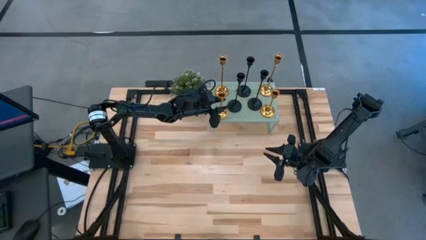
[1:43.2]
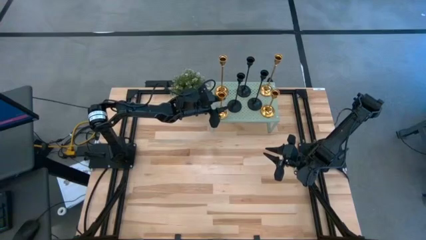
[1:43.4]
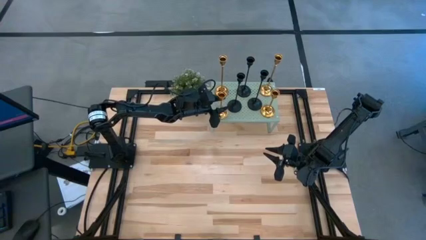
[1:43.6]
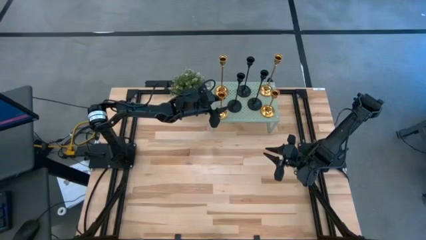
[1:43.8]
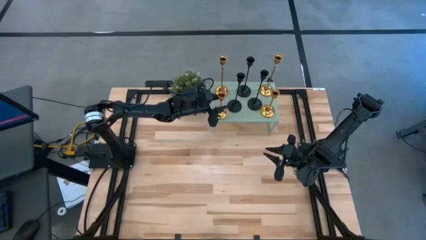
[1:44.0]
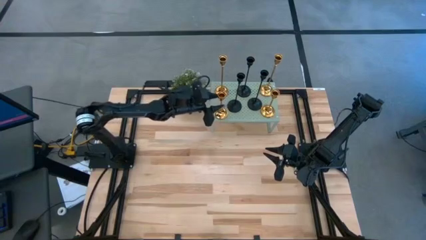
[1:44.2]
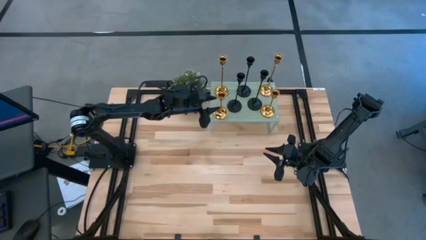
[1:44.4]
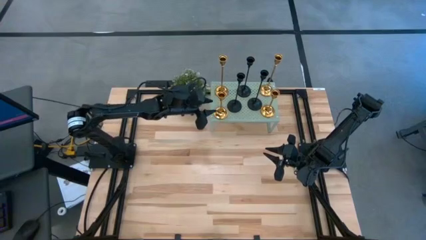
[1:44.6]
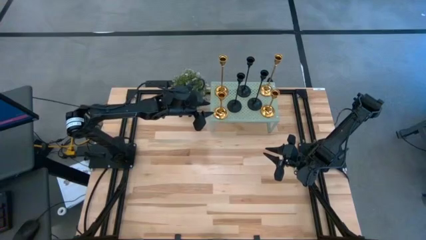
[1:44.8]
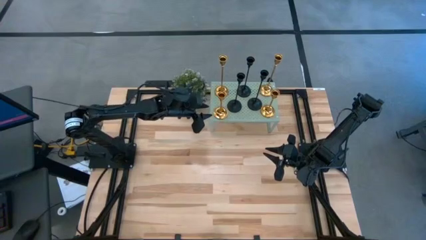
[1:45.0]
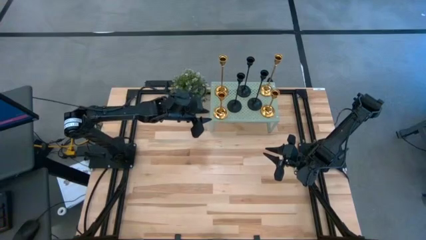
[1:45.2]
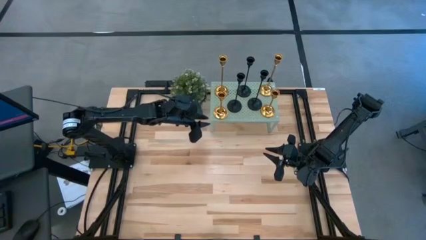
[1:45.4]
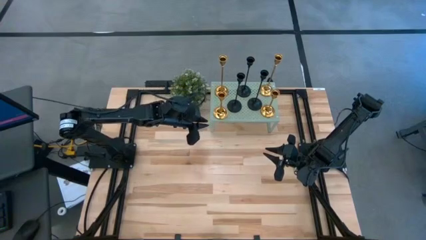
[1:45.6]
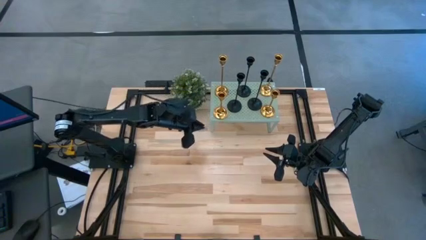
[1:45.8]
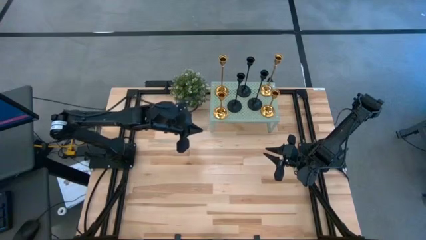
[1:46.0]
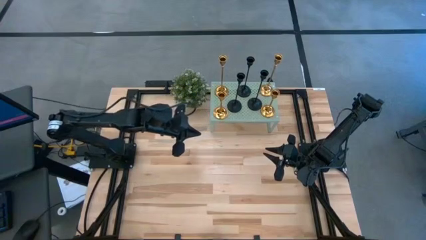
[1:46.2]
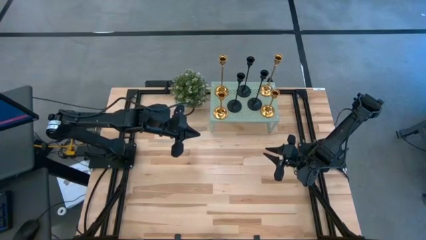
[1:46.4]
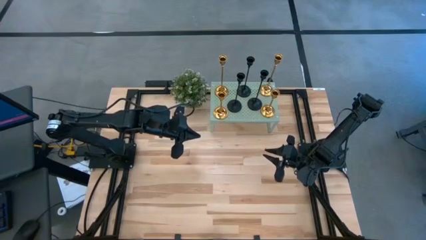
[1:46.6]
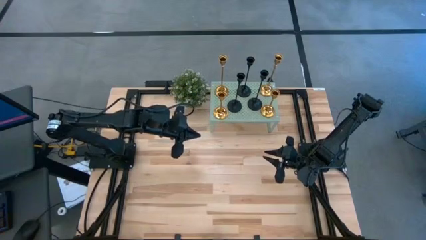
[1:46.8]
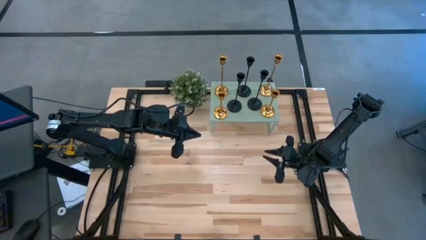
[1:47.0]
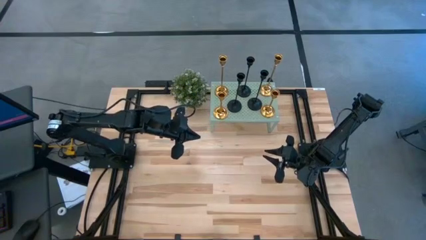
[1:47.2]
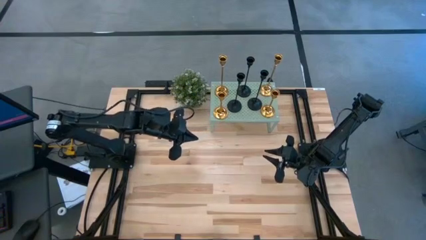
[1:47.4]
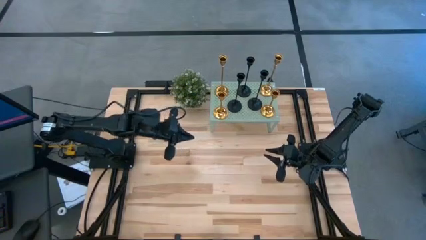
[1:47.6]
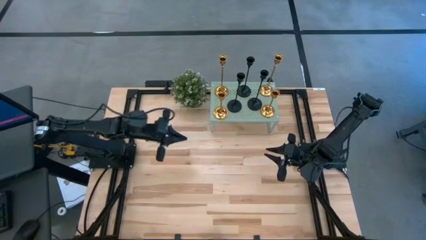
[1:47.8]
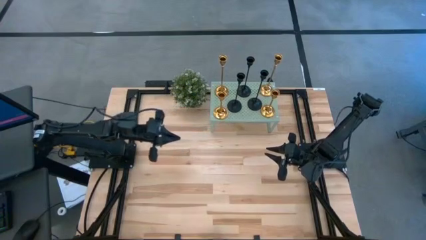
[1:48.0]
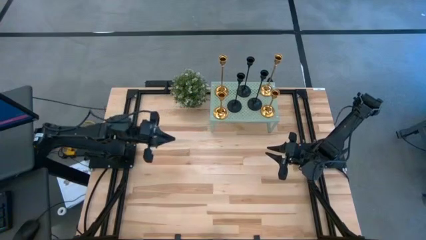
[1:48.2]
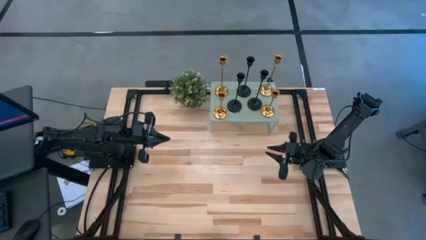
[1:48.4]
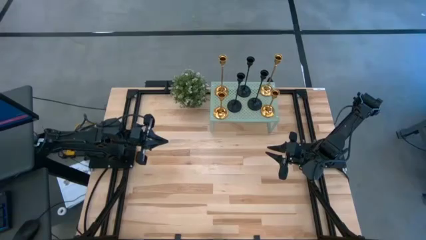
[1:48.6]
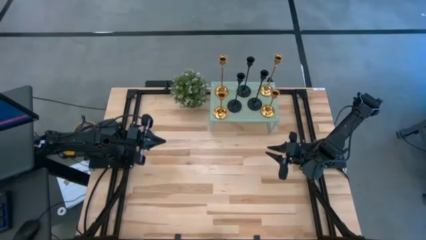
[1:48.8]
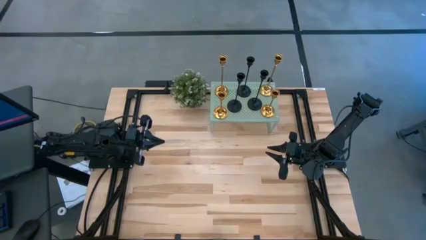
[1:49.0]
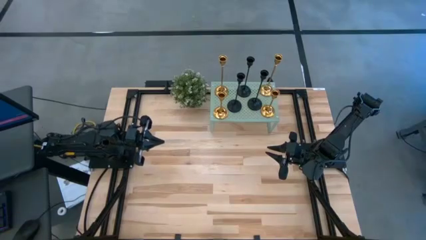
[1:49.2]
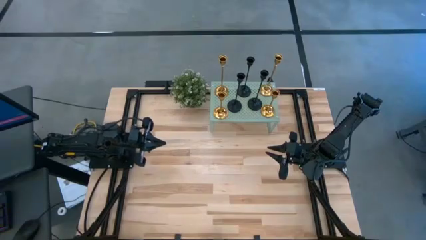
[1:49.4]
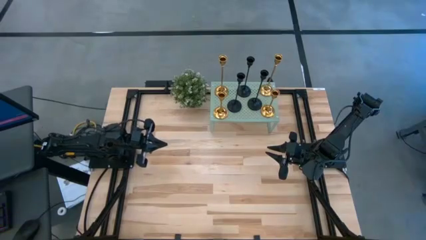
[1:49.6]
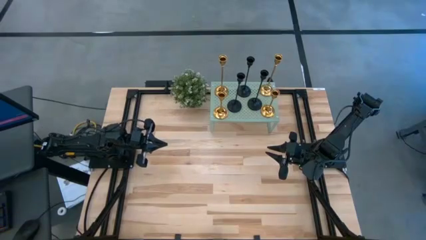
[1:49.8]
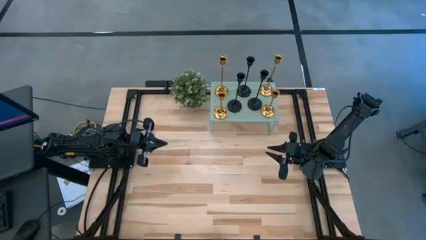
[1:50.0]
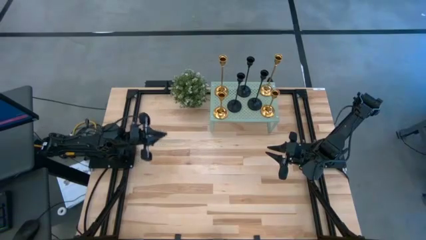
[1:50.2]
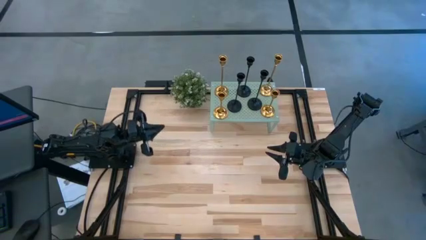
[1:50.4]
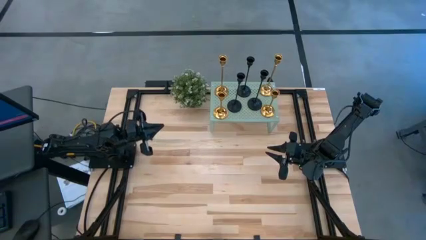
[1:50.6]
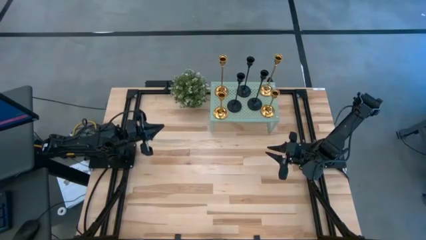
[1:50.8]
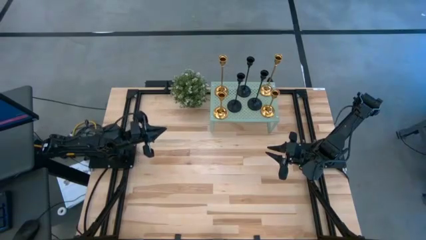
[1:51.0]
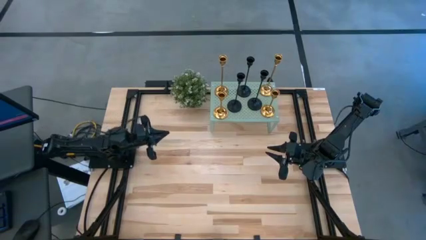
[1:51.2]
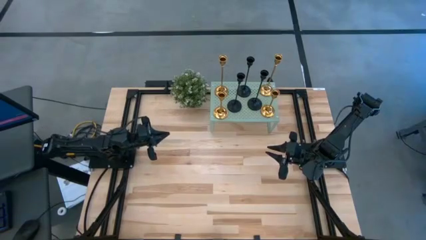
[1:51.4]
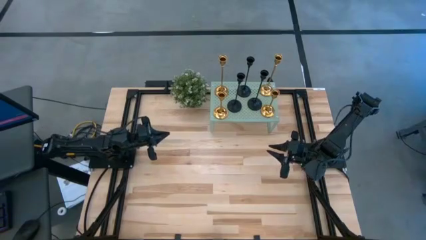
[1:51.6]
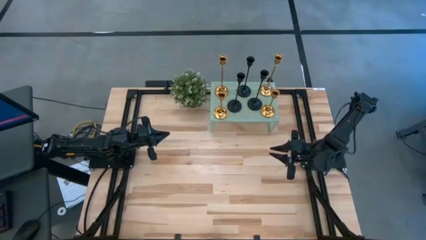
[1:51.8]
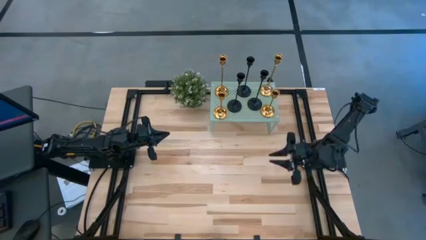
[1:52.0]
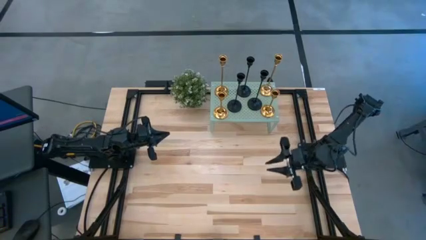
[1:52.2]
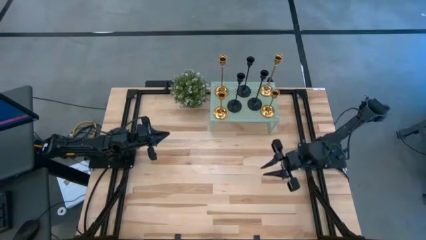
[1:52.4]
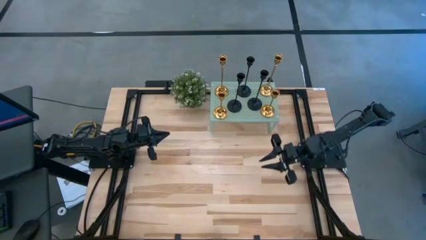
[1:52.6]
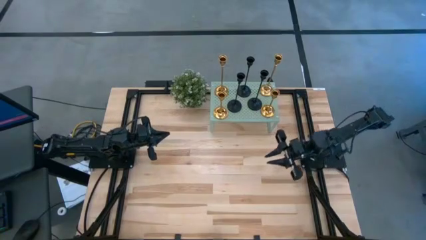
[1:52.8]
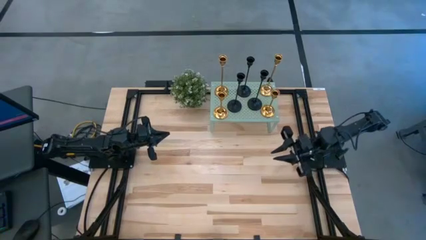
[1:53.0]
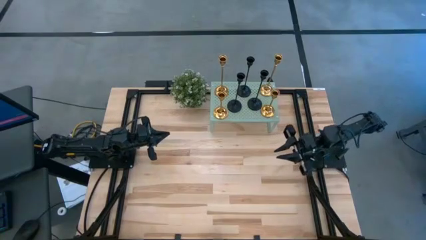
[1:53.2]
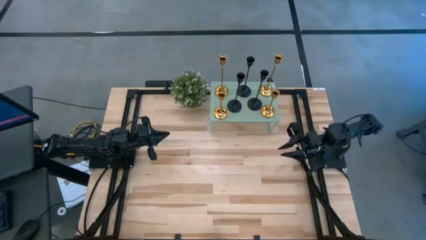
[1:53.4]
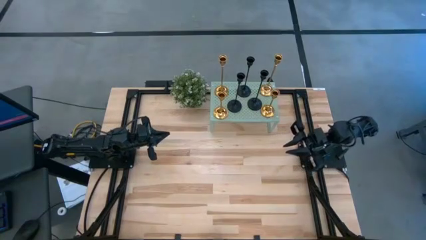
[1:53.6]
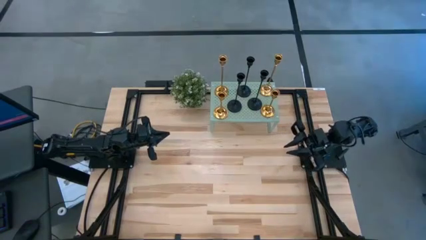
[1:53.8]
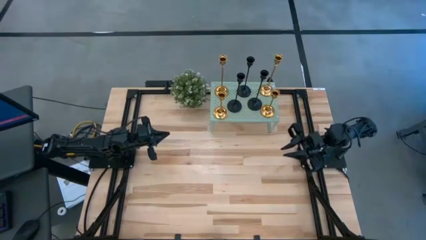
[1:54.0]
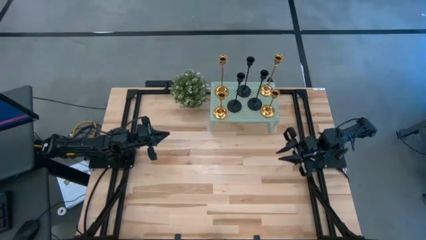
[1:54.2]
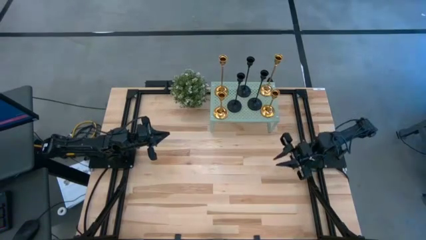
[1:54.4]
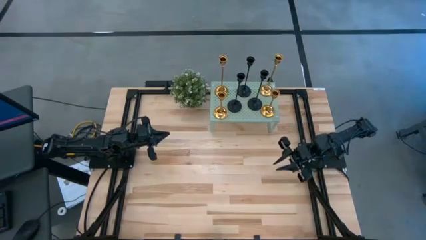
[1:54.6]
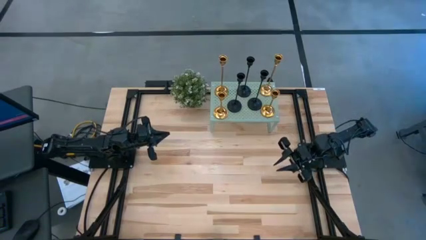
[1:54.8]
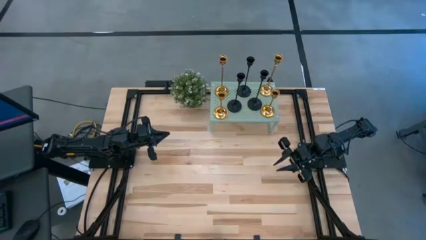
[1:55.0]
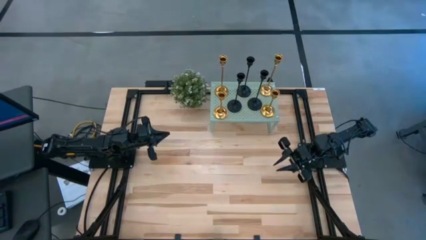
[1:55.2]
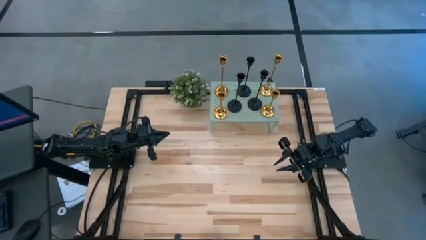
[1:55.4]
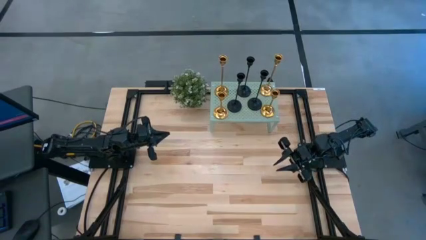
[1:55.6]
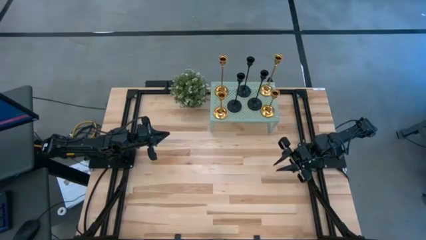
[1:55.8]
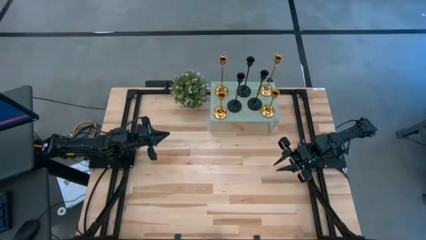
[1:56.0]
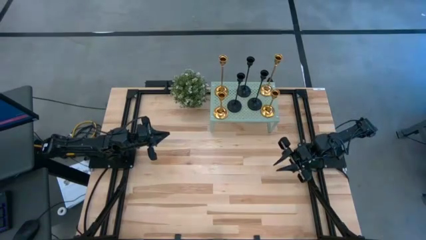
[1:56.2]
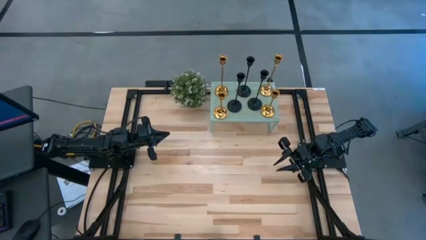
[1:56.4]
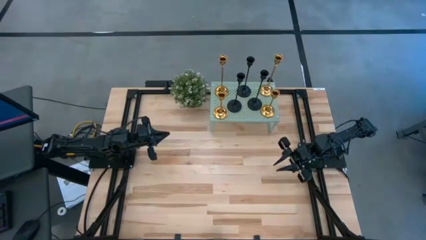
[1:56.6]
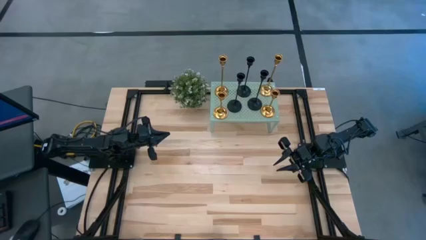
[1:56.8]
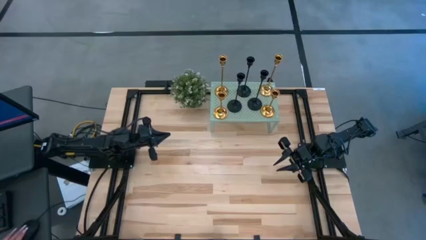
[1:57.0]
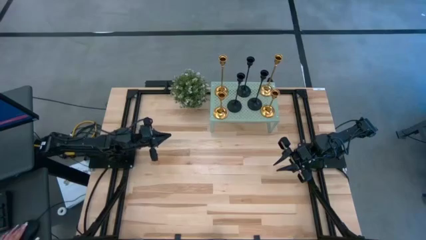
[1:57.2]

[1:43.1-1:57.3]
Task: Pick & Place candle stick holders
Return to Home Position

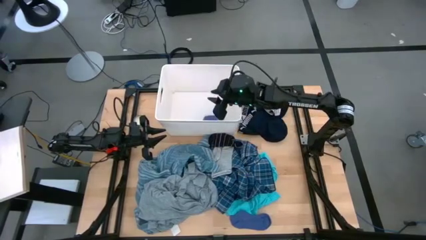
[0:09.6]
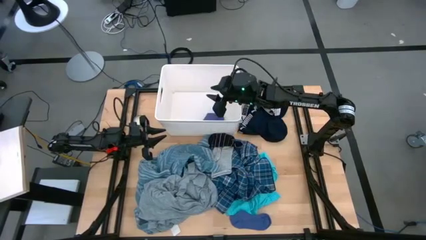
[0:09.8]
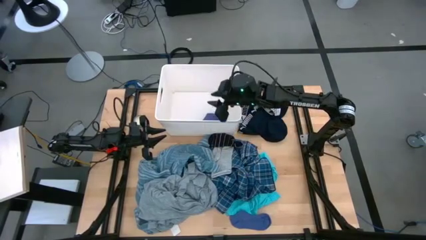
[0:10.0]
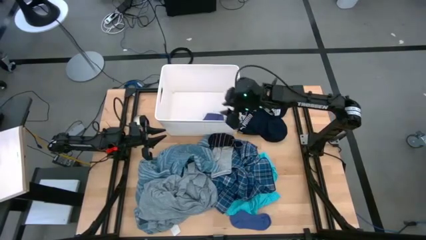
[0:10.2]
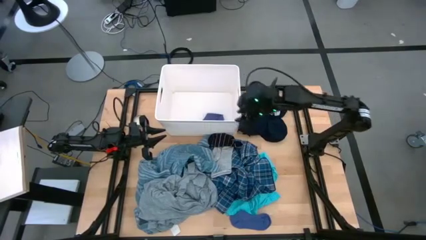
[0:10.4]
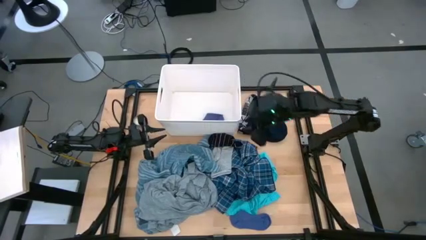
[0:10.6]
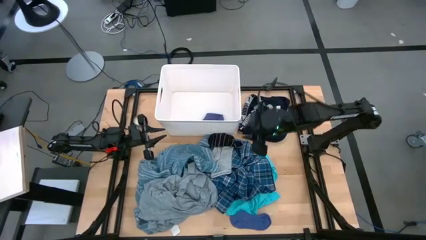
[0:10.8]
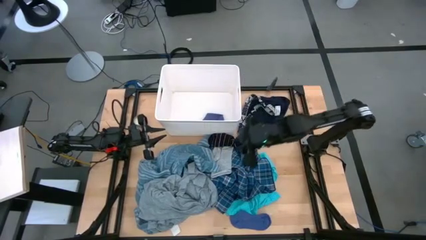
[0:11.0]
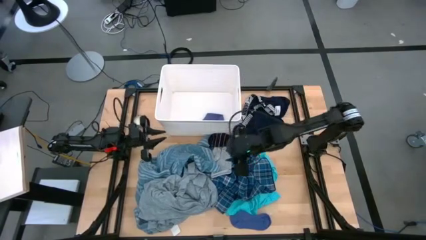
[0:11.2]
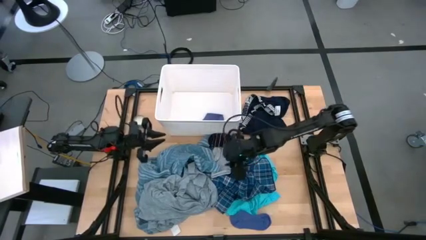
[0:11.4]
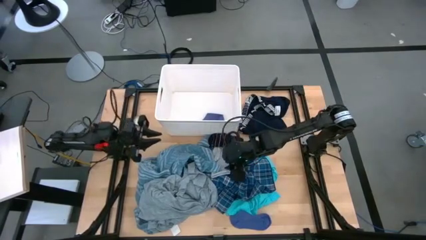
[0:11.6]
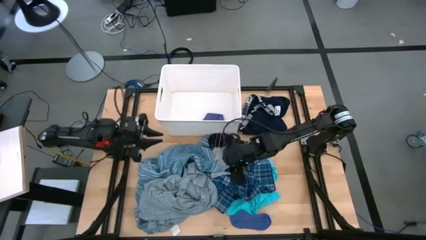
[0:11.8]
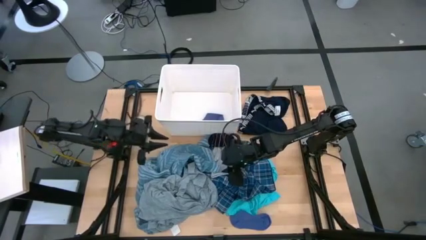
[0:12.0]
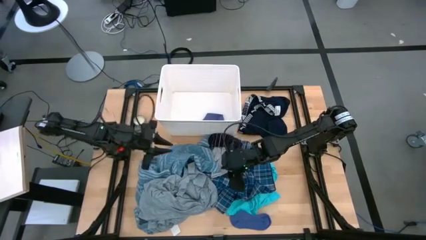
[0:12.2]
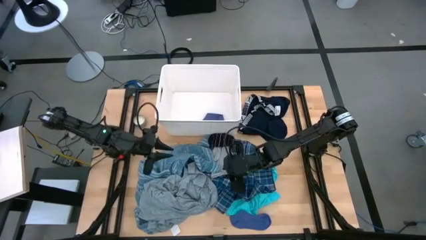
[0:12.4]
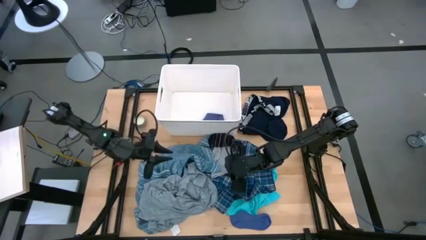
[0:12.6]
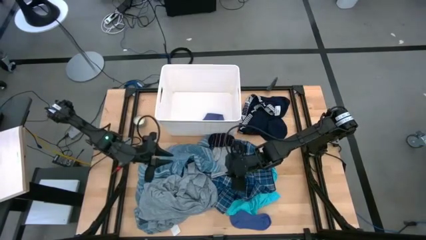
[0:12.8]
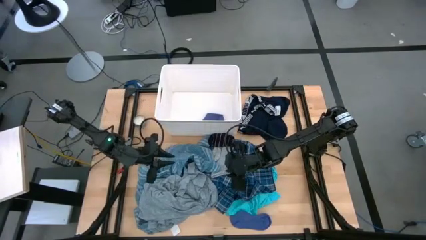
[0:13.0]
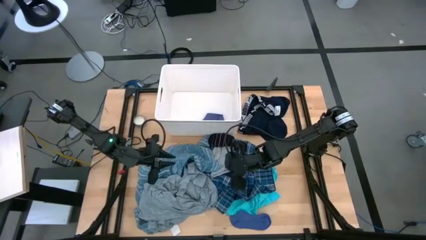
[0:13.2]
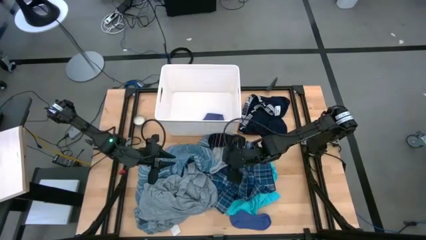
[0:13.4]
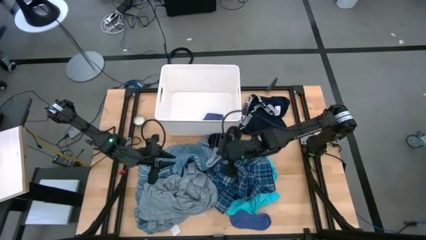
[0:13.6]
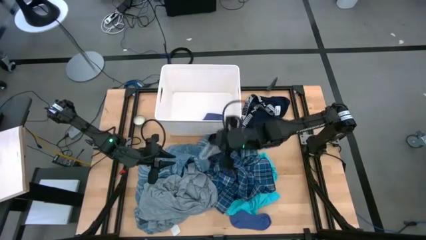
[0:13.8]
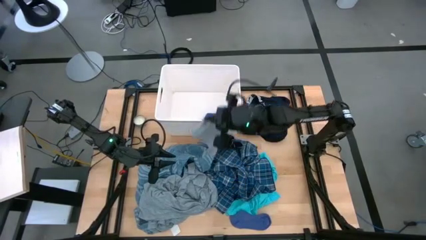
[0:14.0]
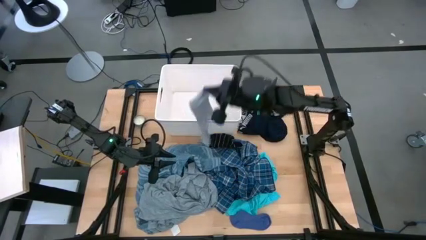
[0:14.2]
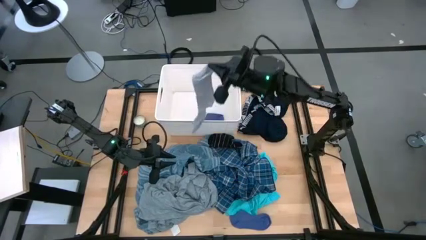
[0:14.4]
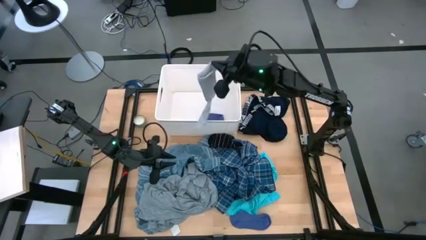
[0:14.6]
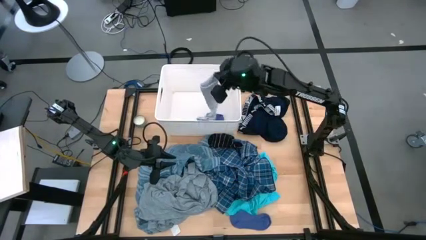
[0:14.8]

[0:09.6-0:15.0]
Task: Sort clothes
Put the gray sock into the white laundry bin
